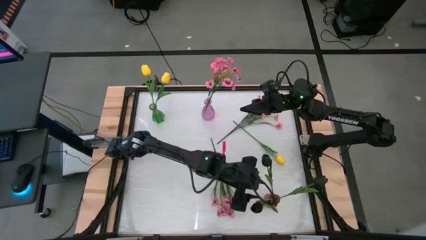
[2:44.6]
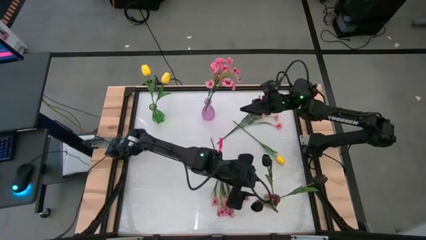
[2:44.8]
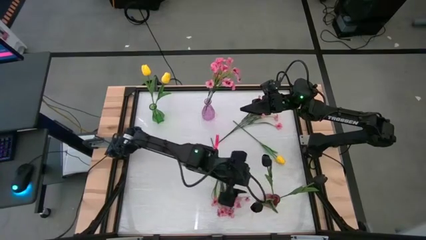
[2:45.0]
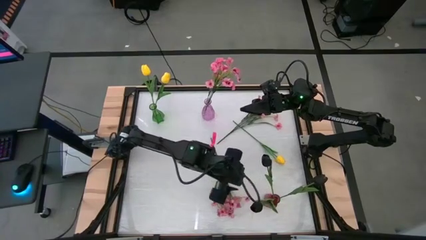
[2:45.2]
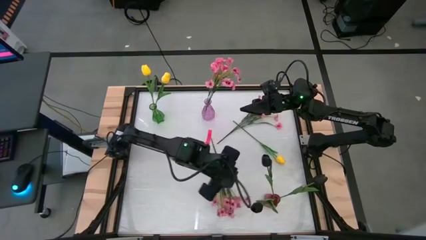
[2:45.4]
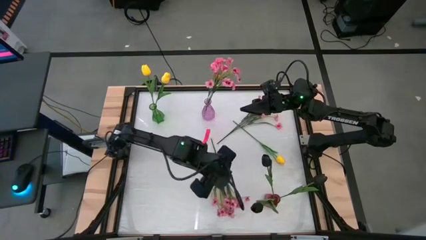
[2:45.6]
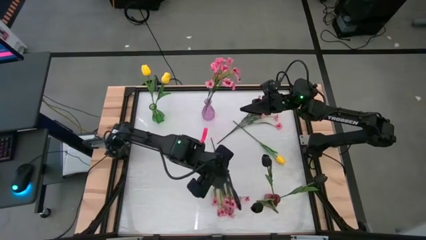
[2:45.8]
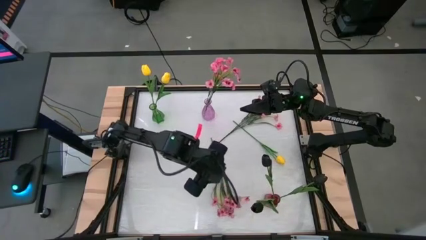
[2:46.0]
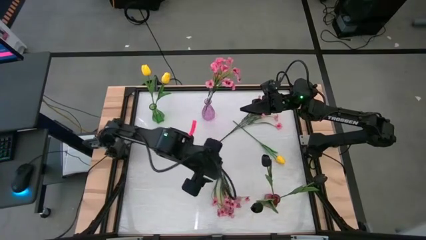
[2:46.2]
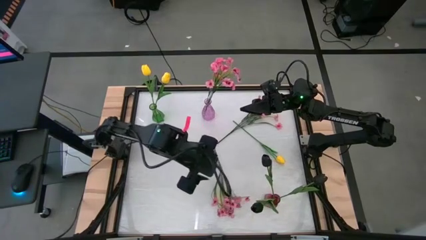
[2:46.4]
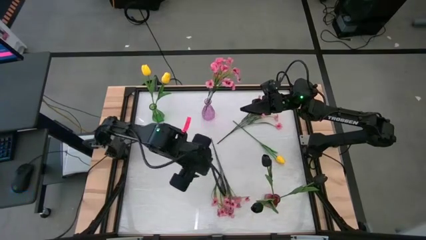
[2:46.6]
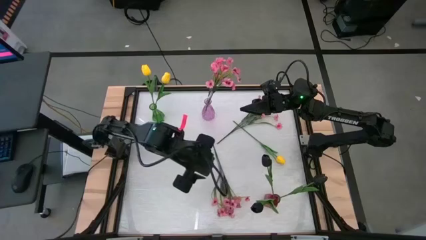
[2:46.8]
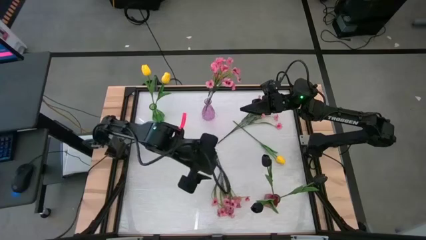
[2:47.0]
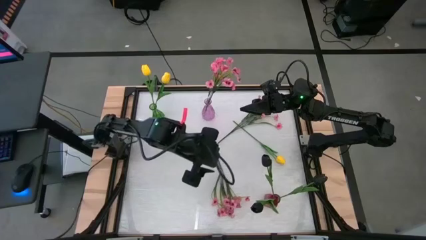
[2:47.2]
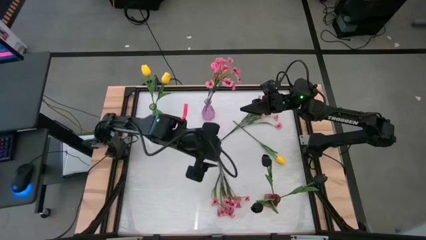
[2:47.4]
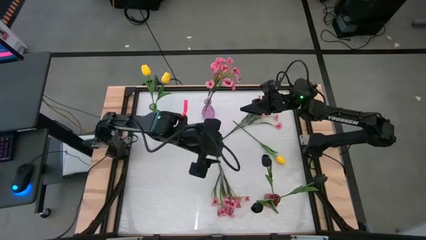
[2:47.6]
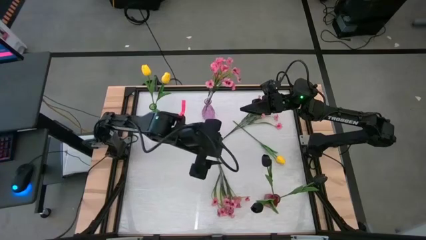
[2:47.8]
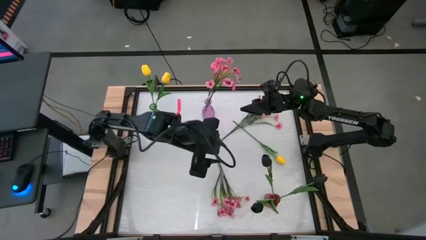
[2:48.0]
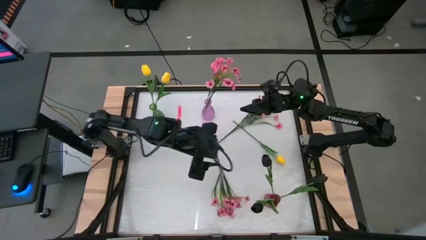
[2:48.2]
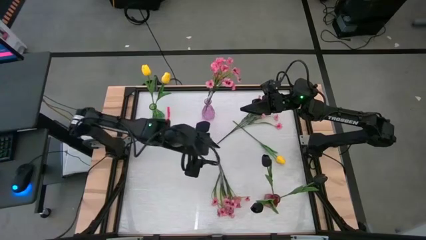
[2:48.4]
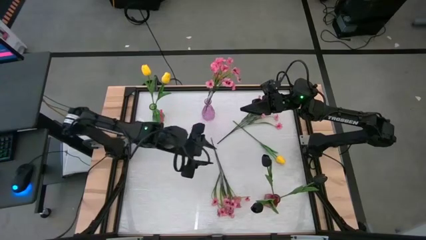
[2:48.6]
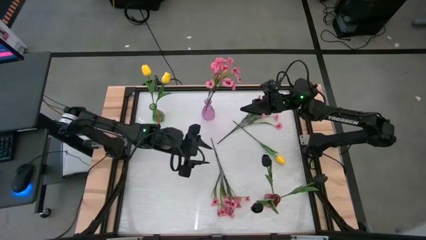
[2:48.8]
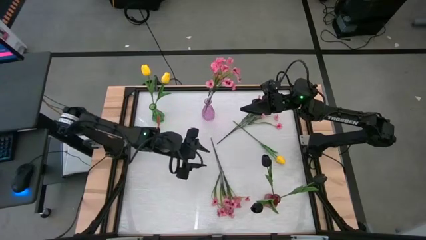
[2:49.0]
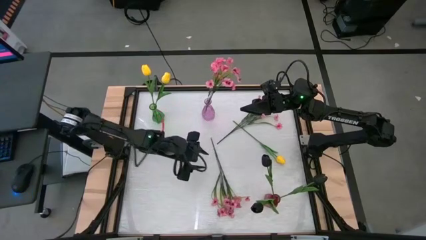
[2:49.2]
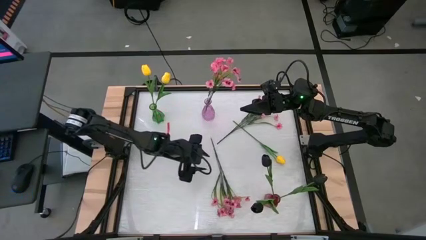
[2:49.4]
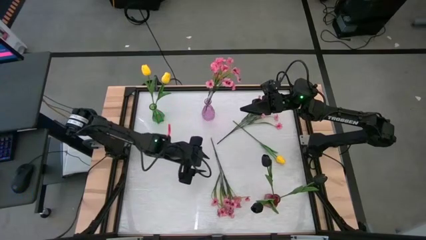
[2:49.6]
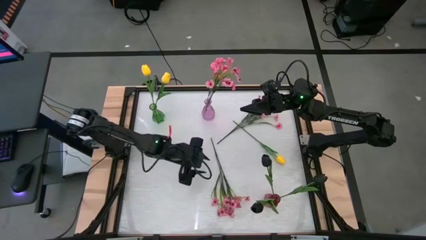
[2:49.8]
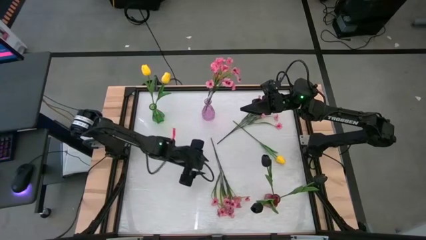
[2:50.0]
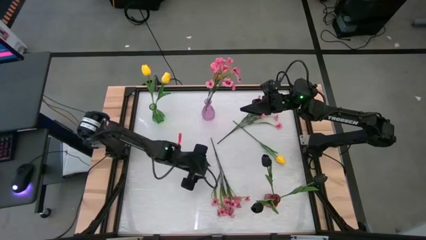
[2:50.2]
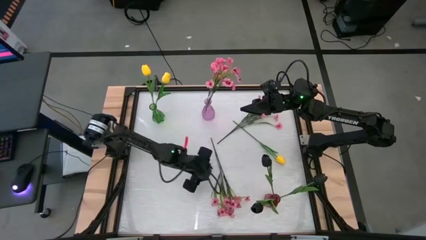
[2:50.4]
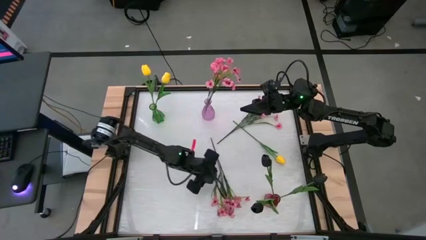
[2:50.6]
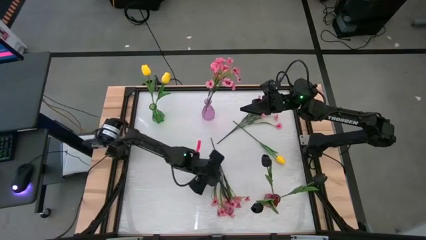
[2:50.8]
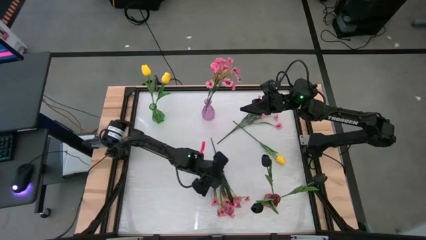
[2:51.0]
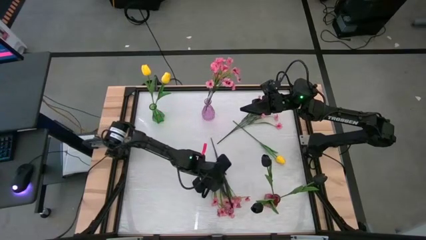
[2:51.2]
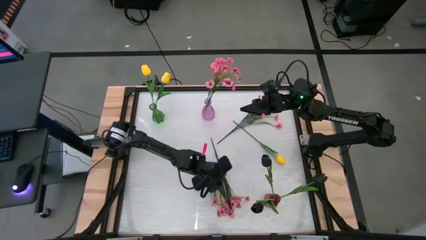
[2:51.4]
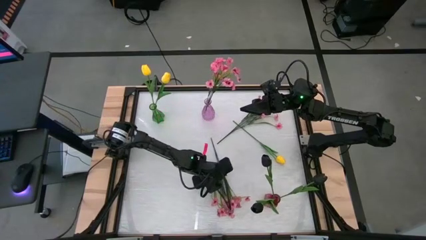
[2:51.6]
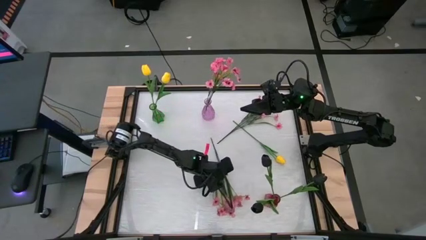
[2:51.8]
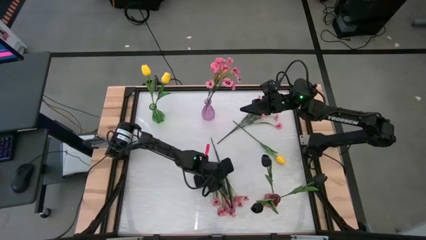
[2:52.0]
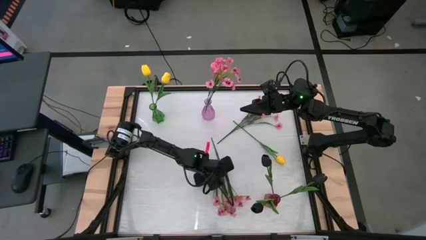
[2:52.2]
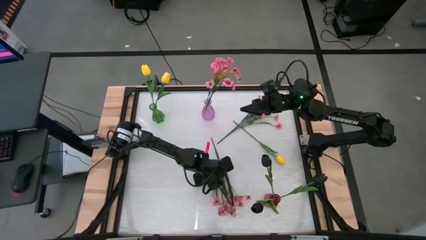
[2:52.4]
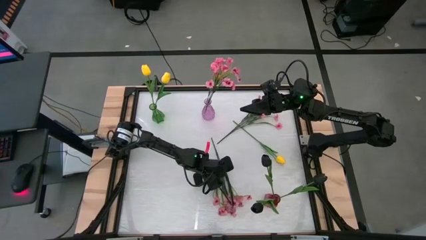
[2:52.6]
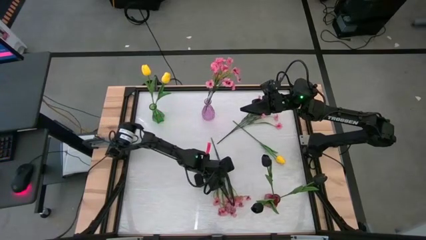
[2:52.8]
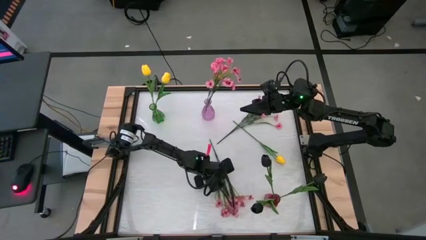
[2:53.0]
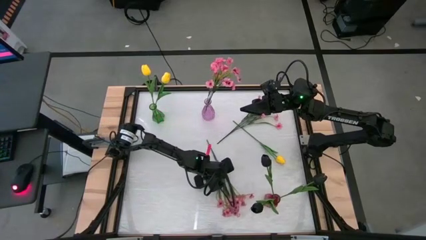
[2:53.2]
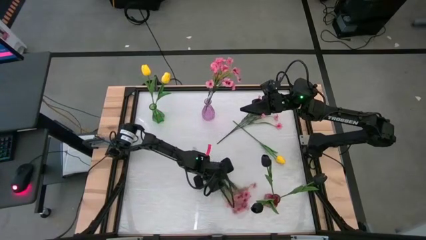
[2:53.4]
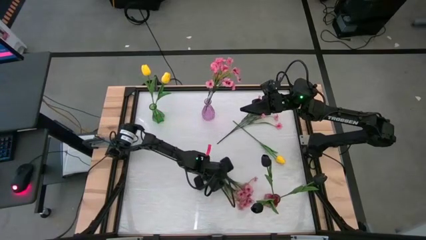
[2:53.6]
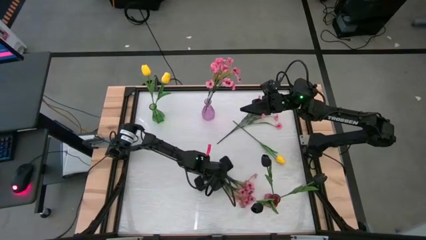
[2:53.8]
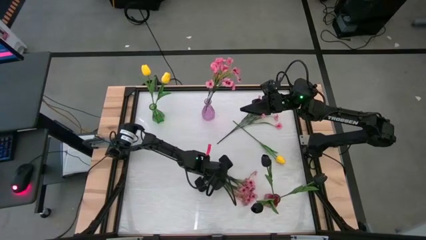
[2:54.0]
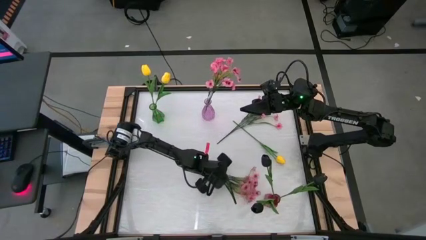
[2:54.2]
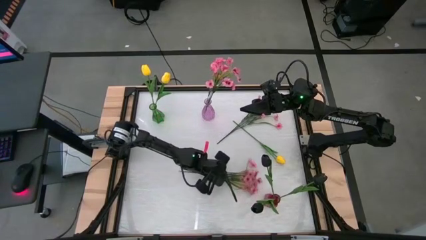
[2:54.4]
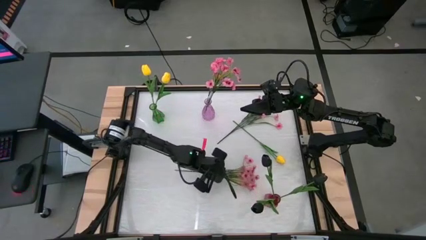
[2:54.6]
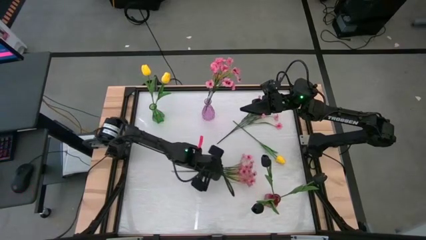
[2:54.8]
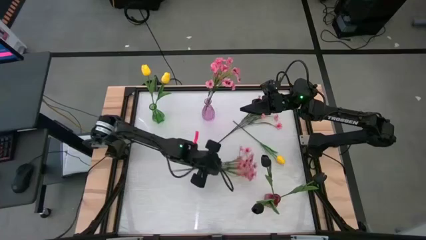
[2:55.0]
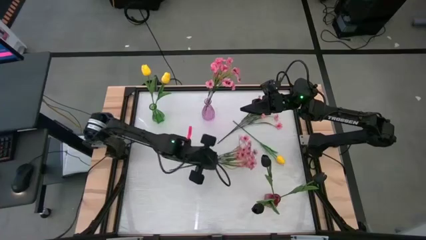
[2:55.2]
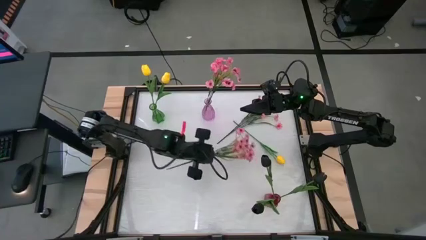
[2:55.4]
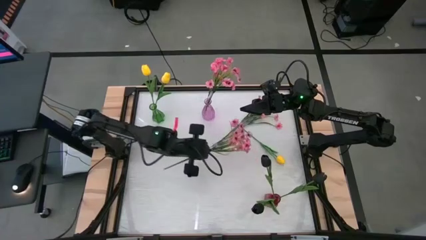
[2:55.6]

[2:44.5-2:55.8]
Task: Sort flowers into vase by color
Put the bottom pink flower into the purple vase

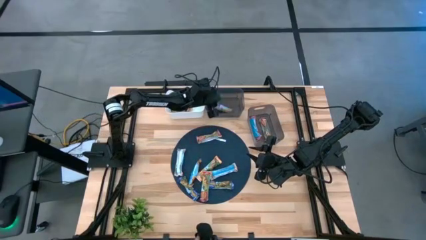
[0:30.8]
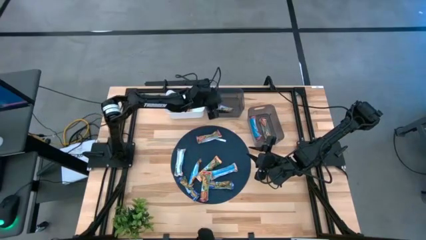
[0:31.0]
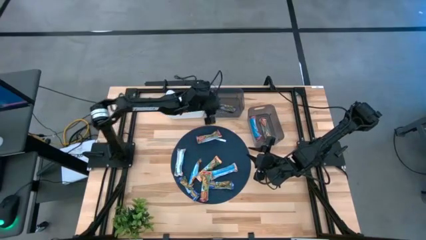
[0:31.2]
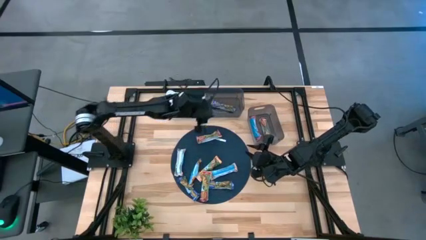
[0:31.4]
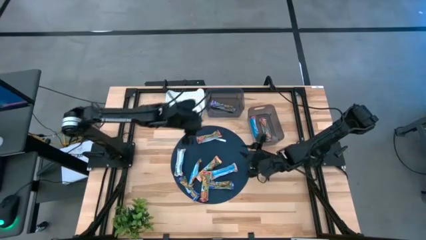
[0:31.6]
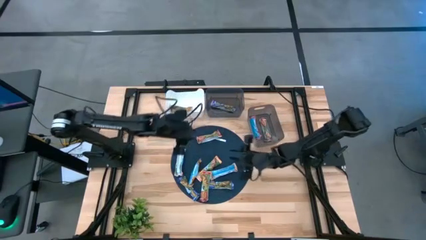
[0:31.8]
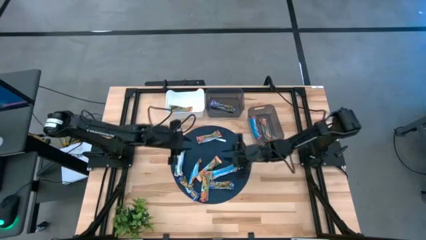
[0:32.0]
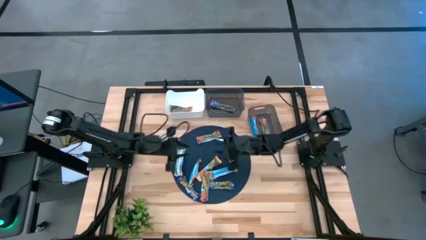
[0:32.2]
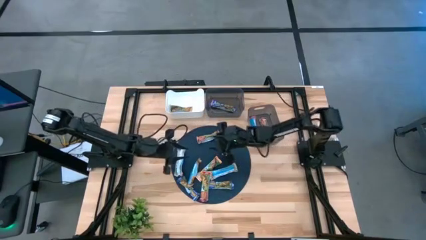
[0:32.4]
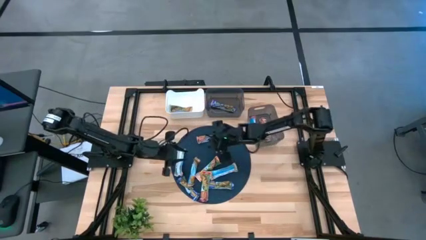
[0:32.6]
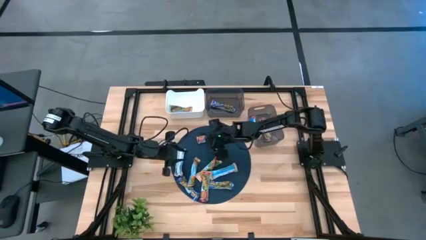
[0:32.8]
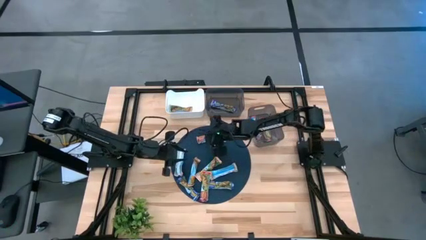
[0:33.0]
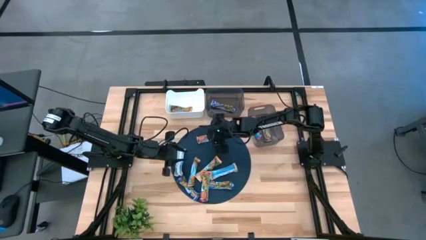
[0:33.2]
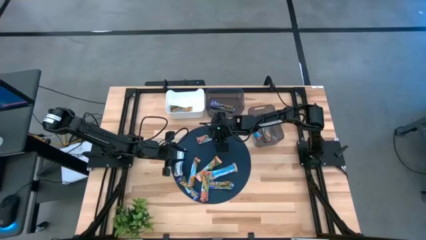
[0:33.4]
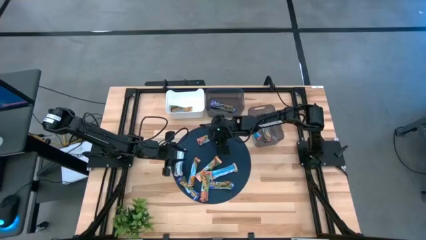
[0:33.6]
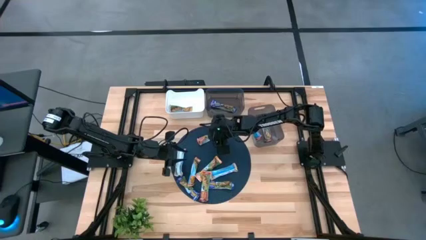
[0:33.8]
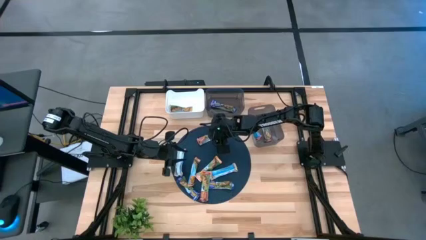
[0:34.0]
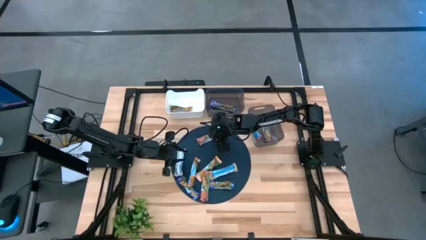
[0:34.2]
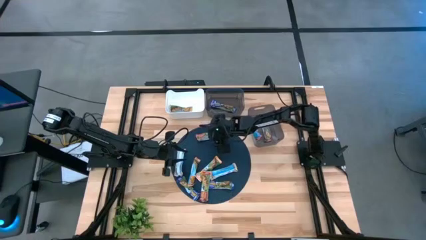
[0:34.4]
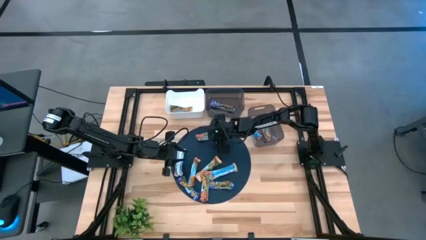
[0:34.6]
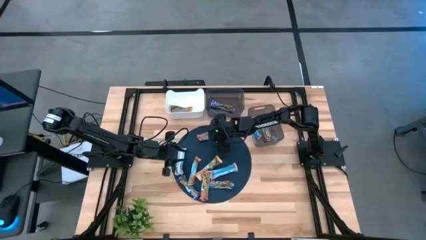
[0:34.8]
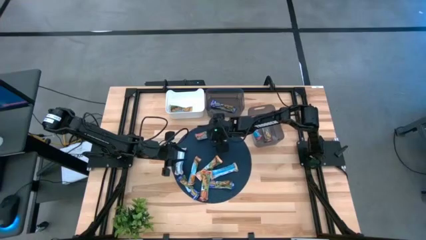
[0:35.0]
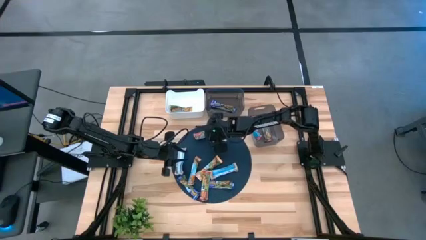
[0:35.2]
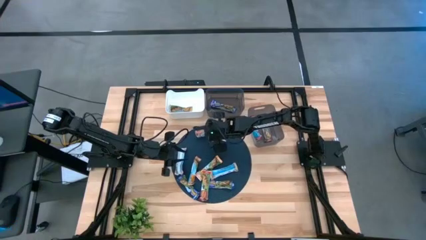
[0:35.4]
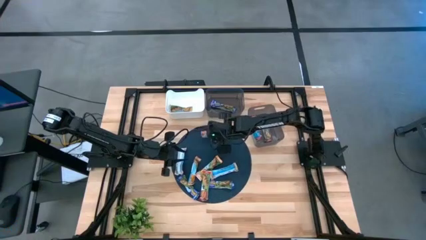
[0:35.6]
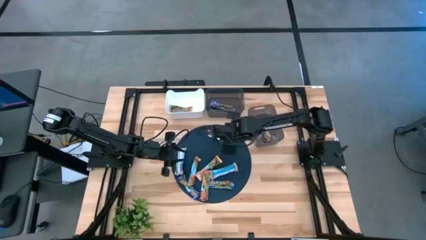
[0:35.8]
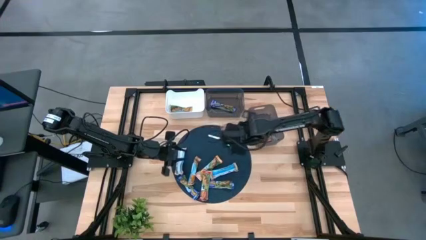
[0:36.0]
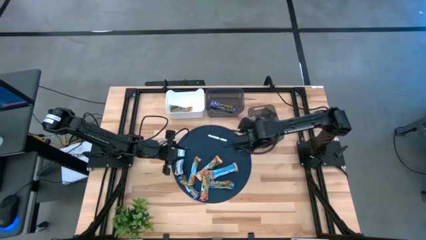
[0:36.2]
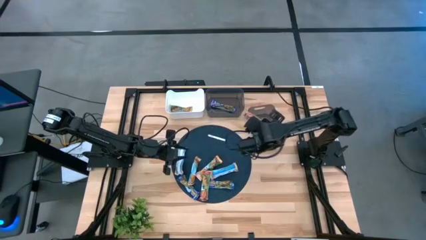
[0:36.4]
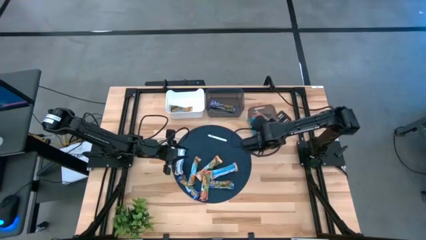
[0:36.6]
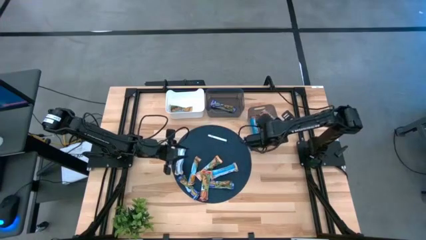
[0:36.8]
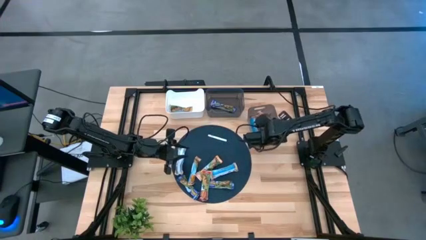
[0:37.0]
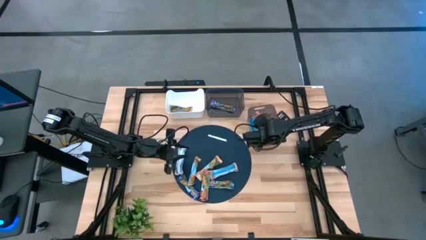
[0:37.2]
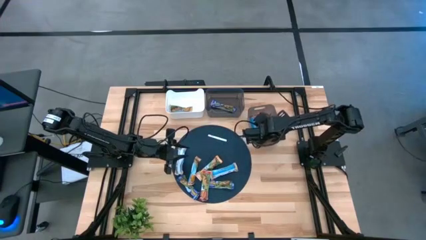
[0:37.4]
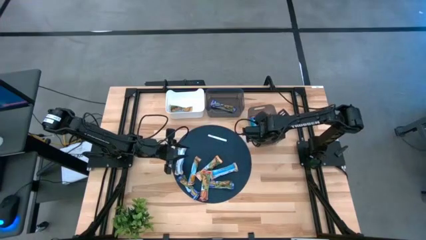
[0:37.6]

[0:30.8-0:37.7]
Task: Pick and place Granola Bars by type
Put the red granola bar into the bottom black bin
